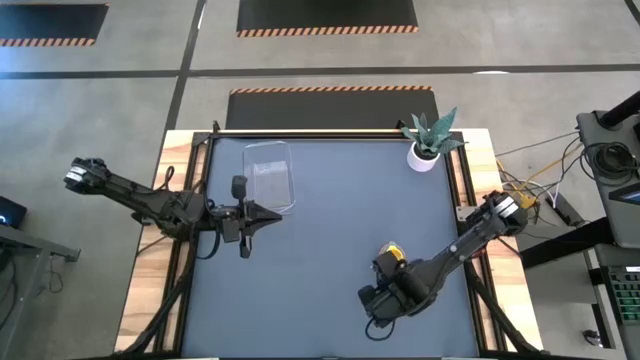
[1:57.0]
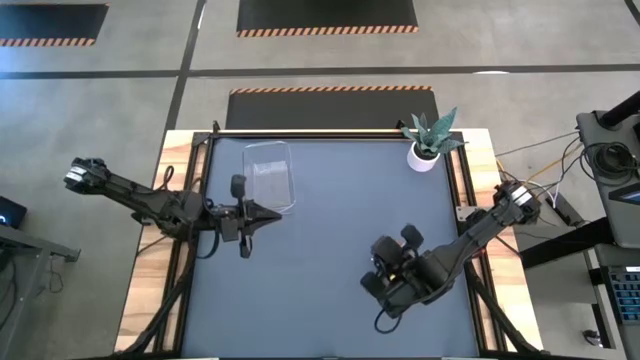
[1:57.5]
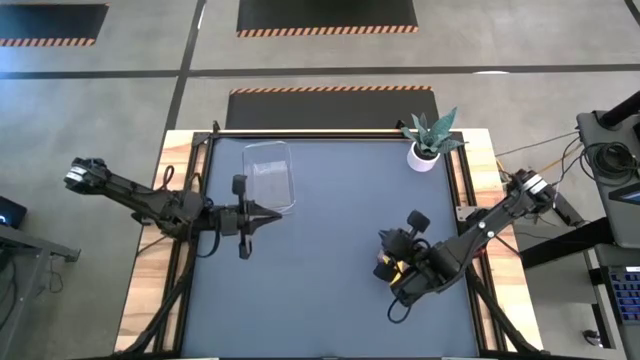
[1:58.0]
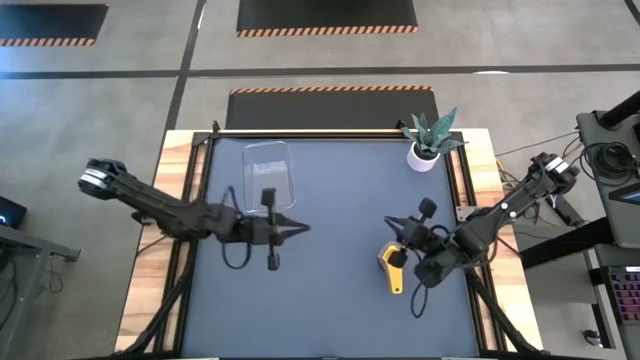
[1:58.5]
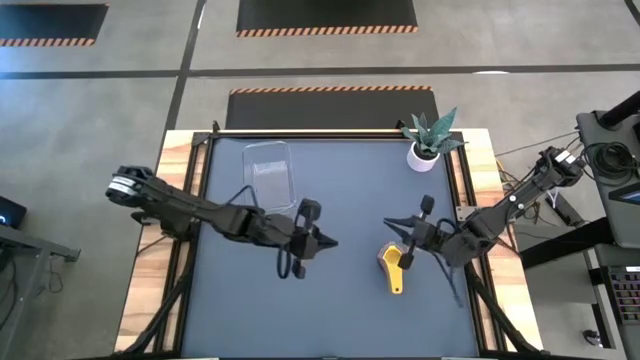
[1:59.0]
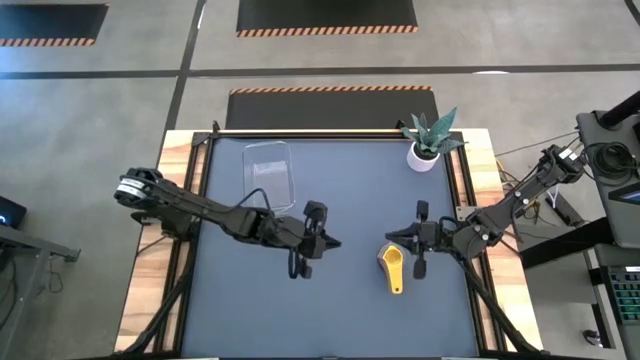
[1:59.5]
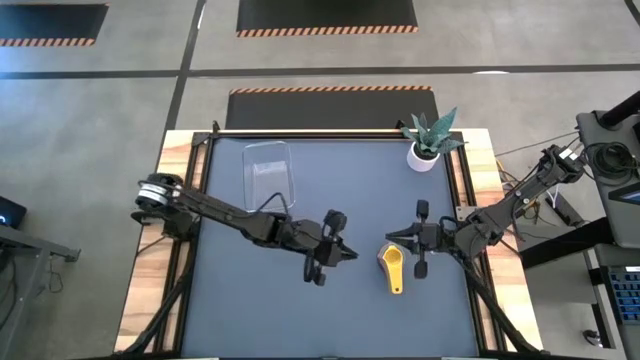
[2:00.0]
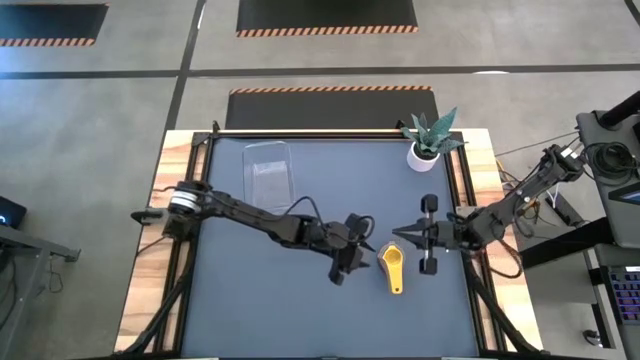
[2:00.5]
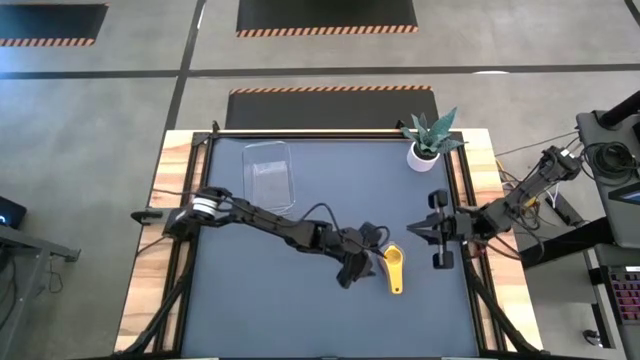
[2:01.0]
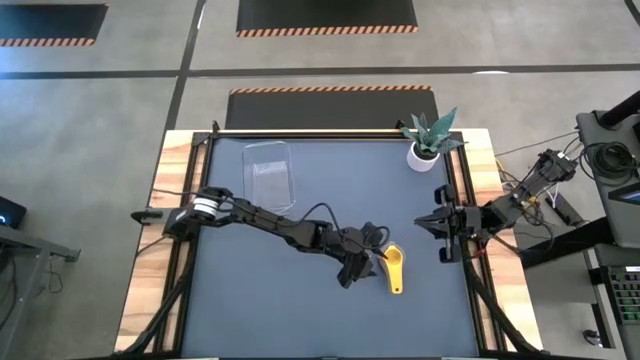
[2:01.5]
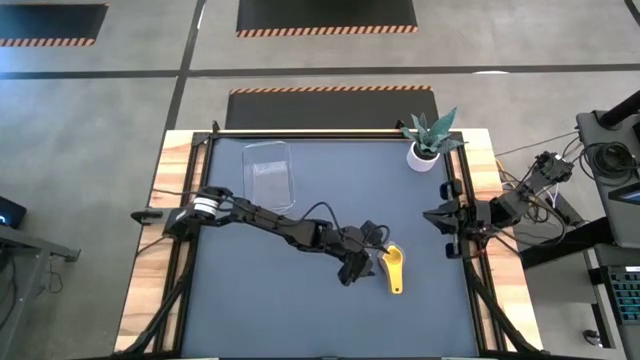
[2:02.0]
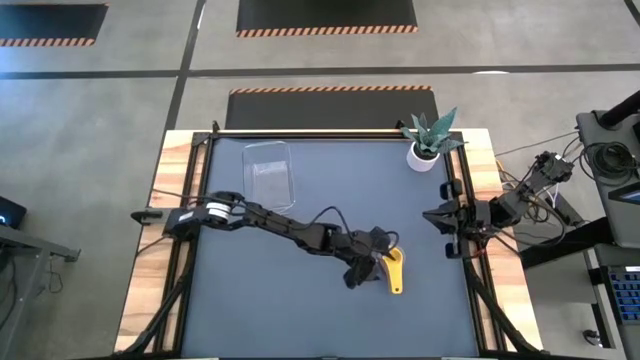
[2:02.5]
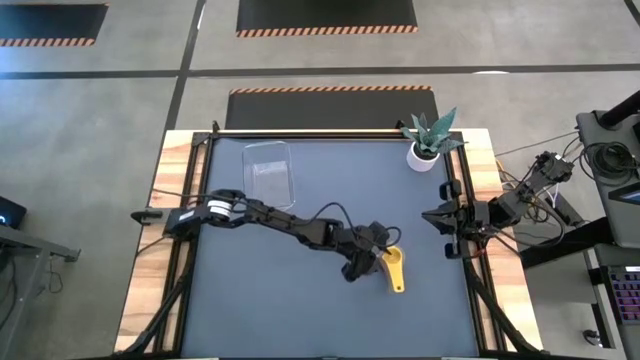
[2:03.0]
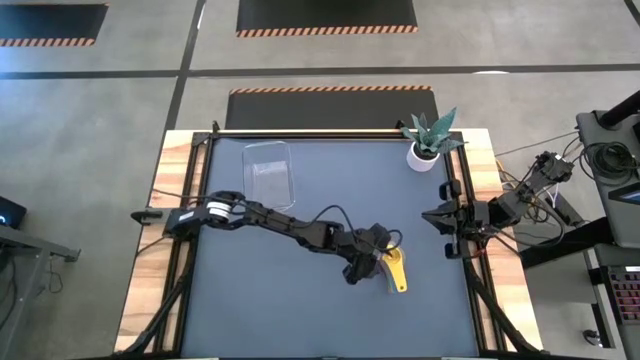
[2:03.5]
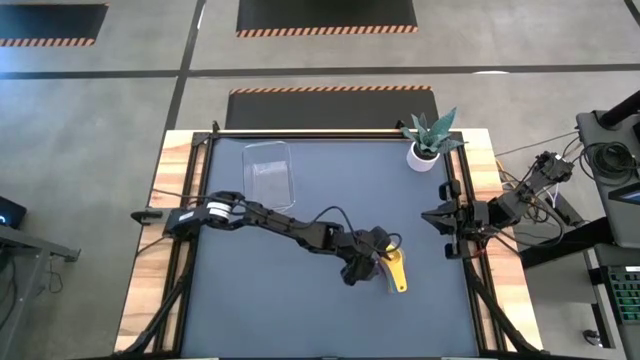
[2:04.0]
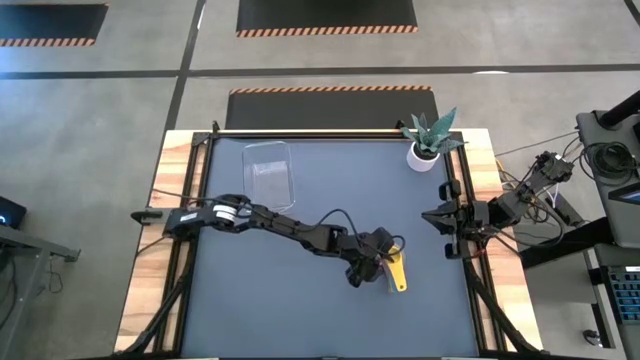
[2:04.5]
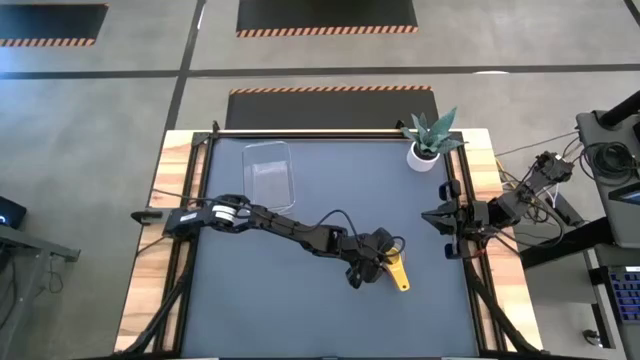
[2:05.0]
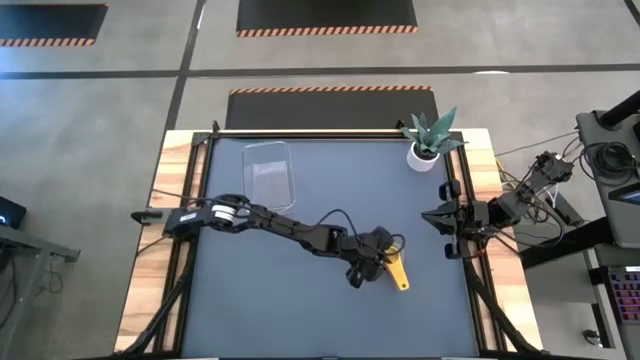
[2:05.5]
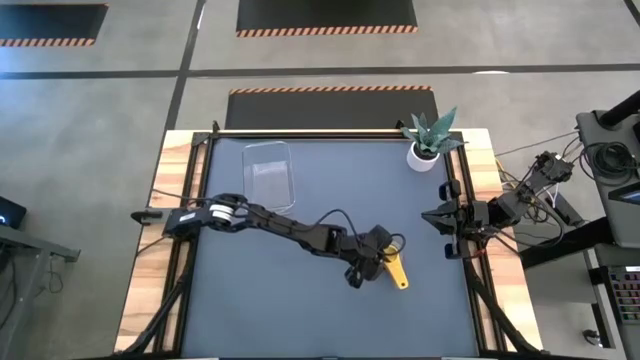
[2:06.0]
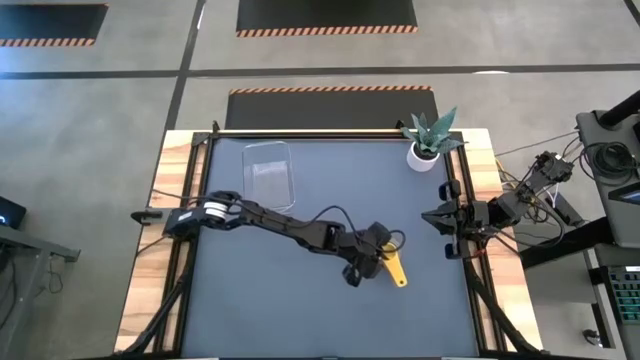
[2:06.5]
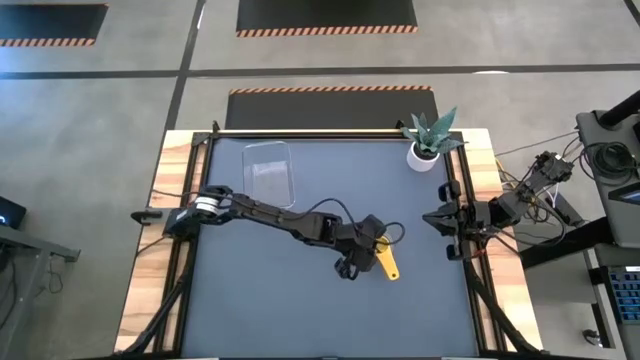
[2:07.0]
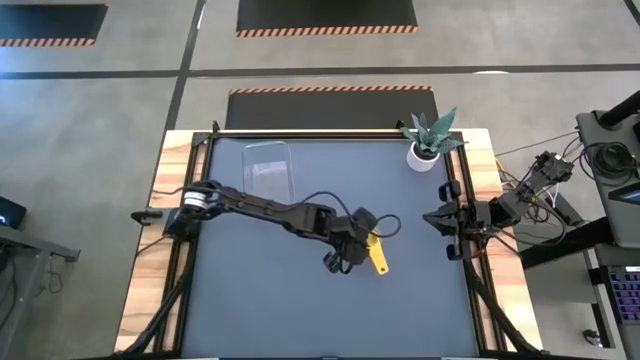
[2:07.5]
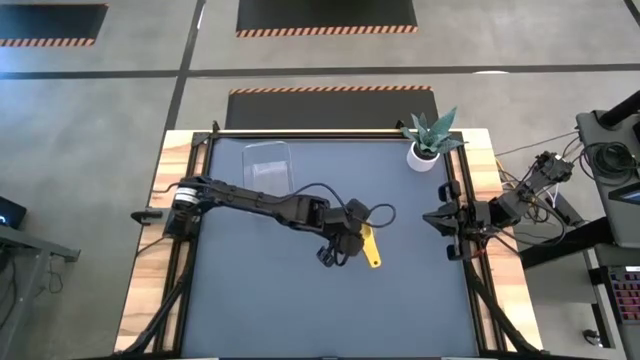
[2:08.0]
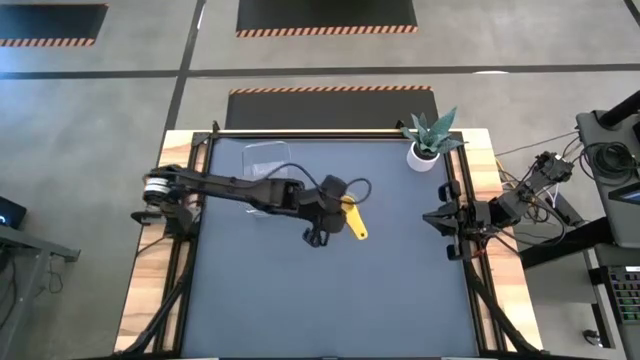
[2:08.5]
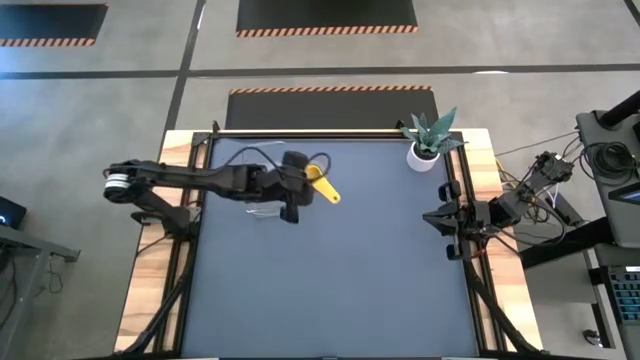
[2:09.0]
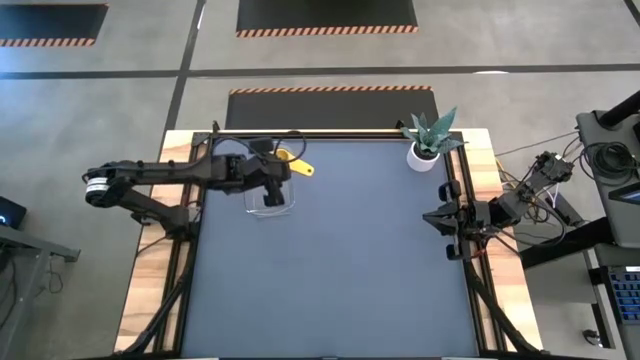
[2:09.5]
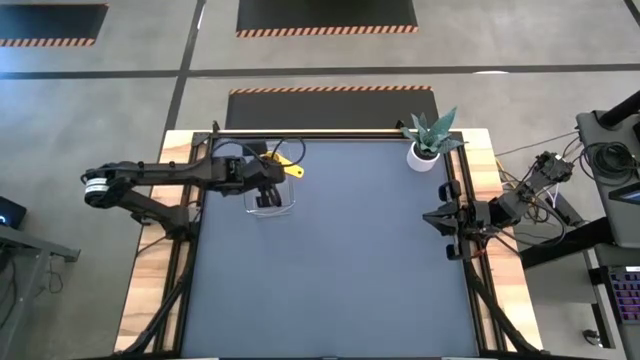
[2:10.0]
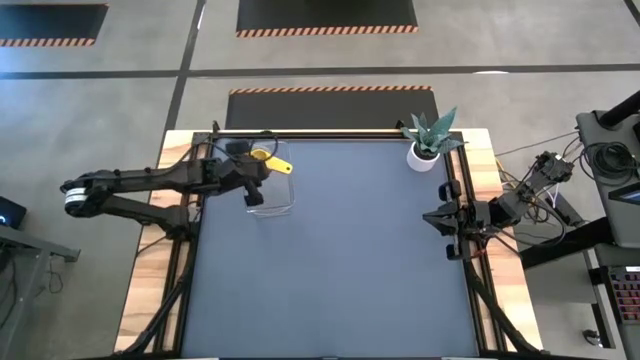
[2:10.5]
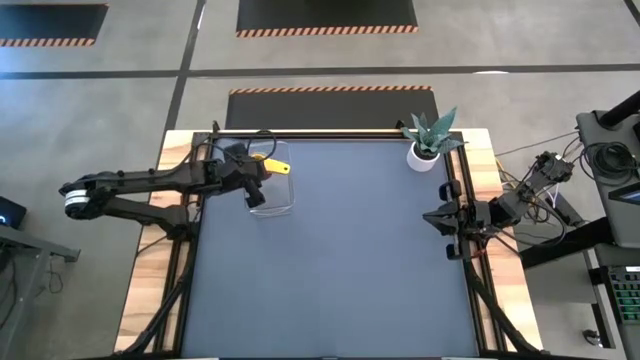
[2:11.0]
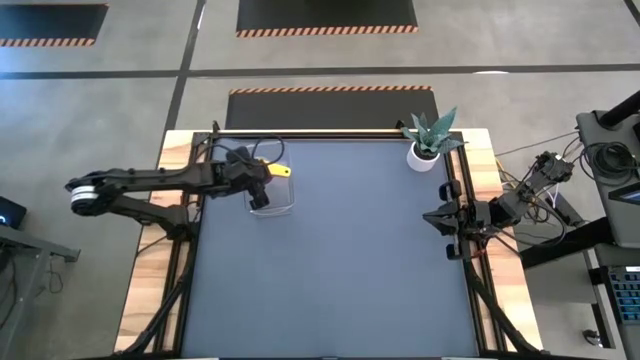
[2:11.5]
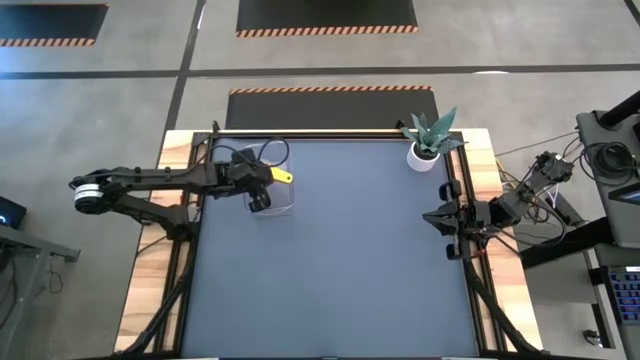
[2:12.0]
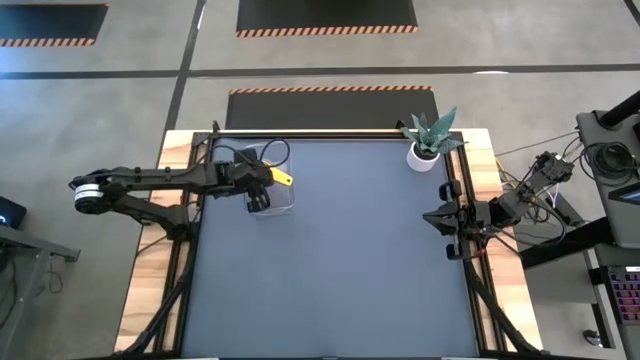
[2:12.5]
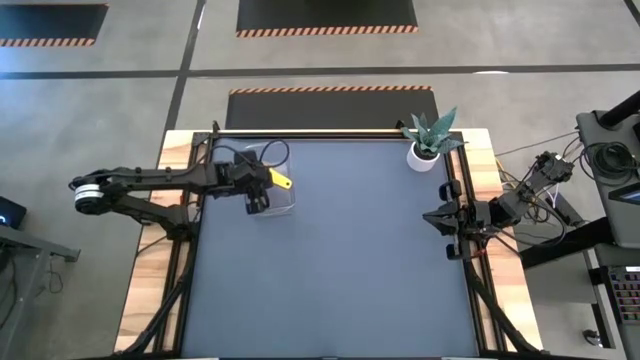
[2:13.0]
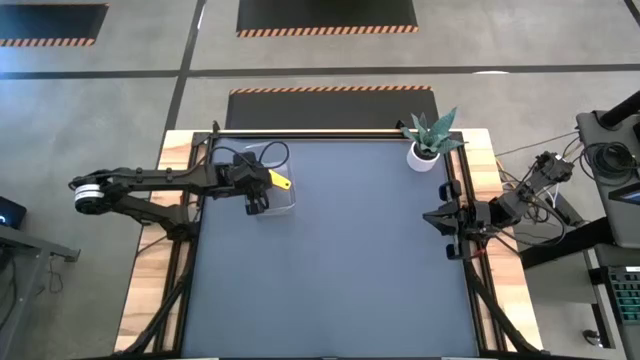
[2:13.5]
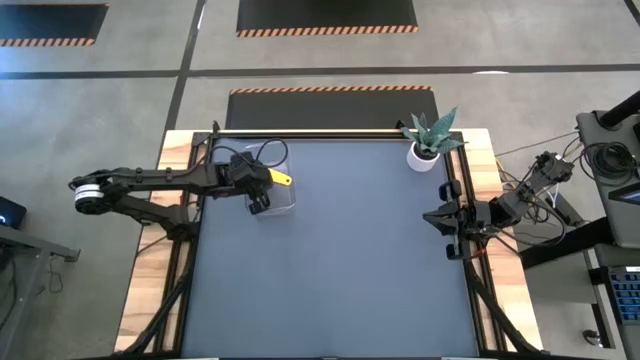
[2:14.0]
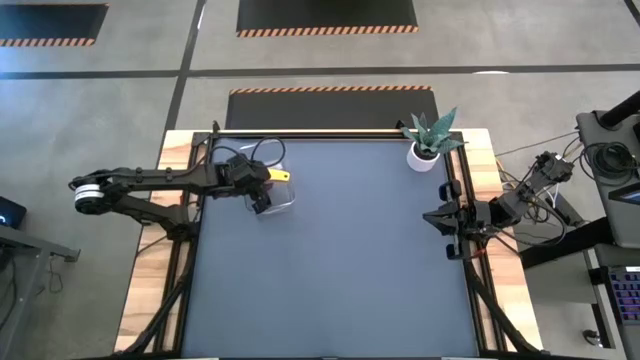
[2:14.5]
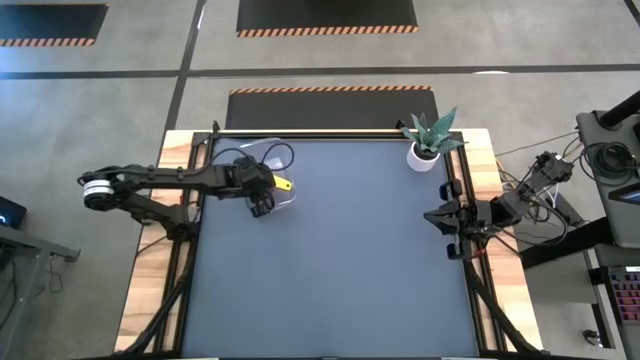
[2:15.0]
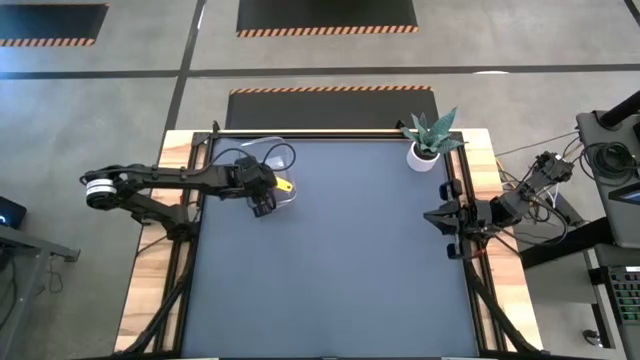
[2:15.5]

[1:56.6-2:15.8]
Task: Nest measuring cups in basket
Put the stacked measuring cups into the transparent bin

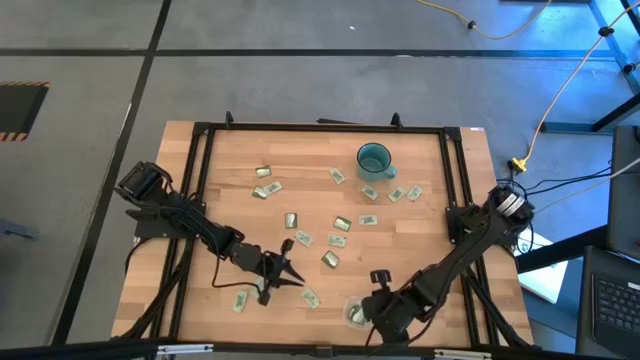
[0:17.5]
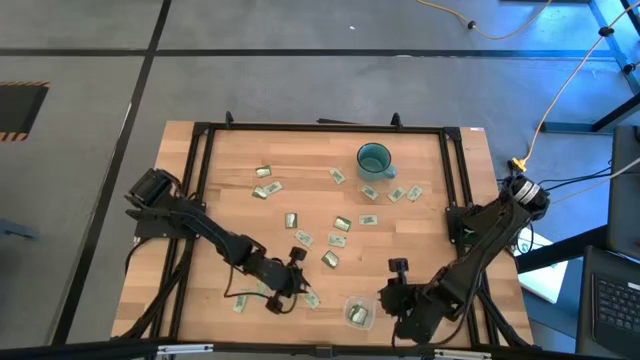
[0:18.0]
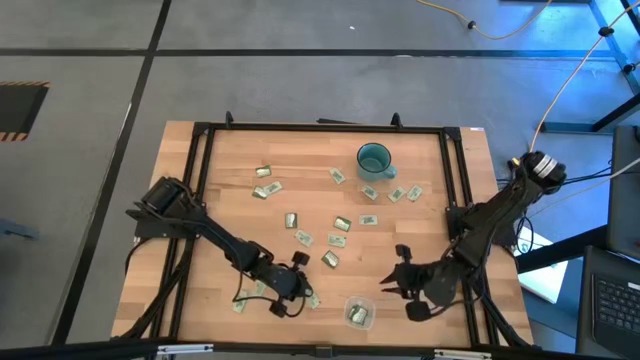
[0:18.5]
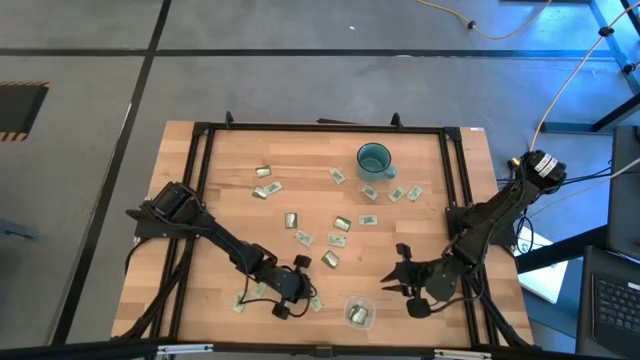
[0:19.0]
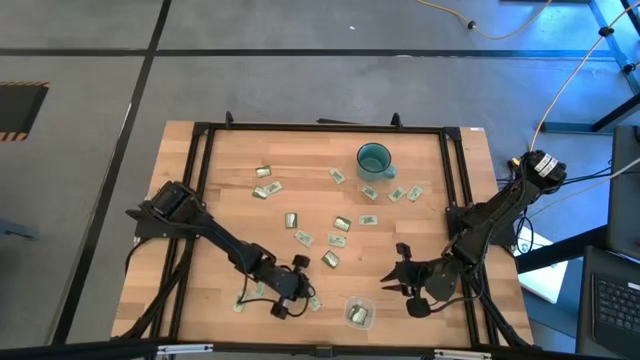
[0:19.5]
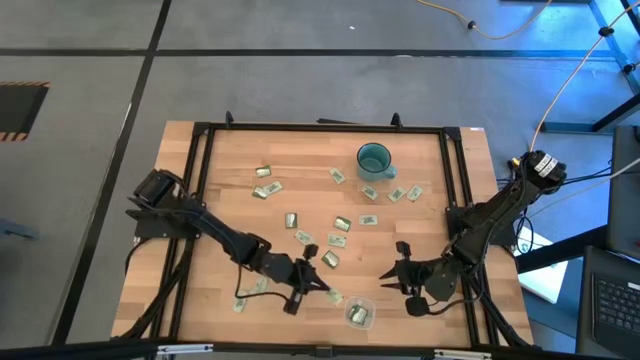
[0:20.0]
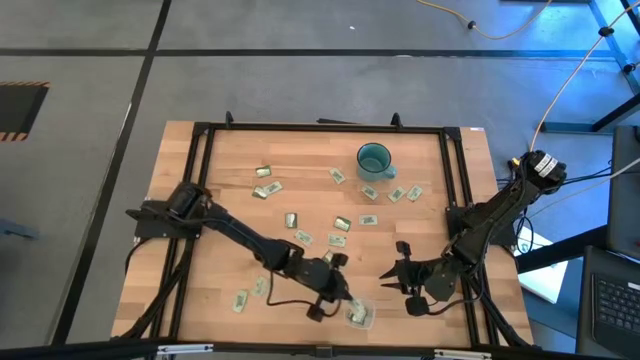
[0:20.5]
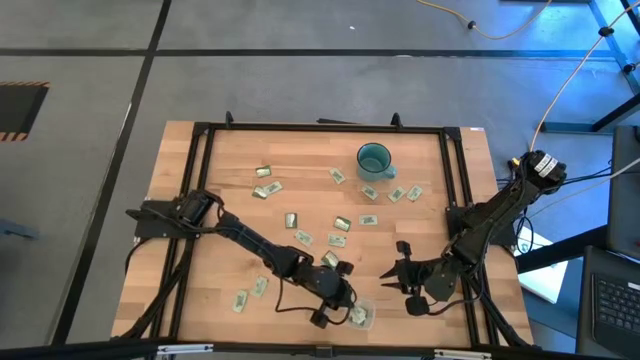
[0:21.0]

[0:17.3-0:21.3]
Task: Pick and place items into bin
Put the light green stevia packet into the transparent bin
